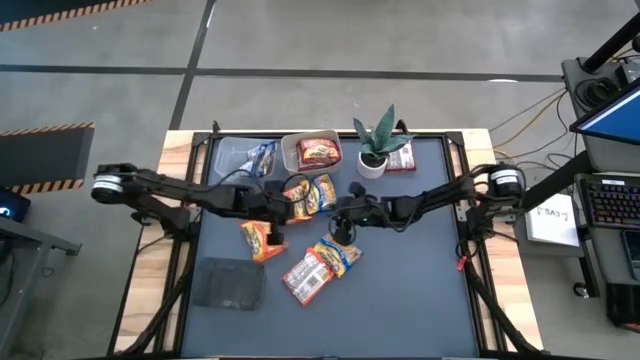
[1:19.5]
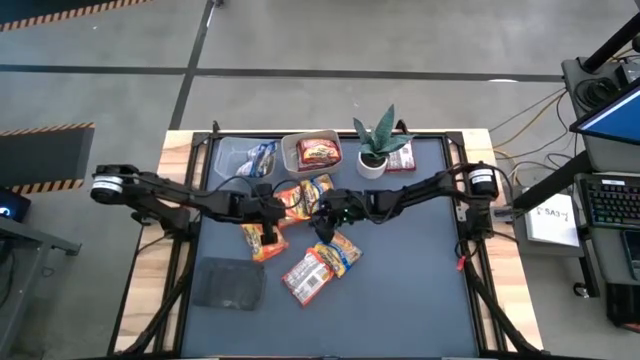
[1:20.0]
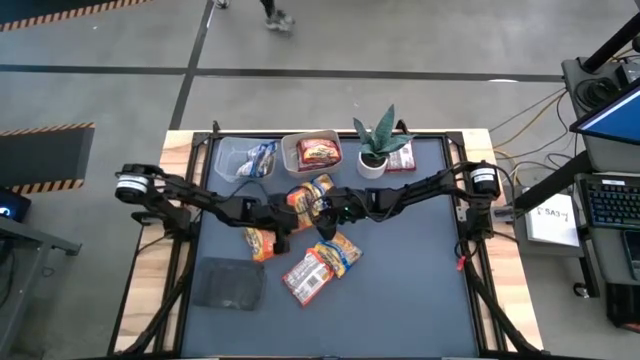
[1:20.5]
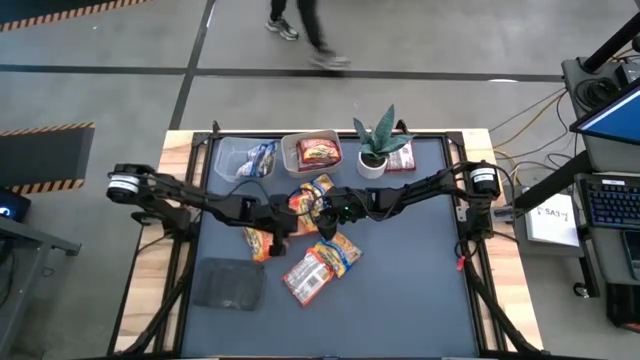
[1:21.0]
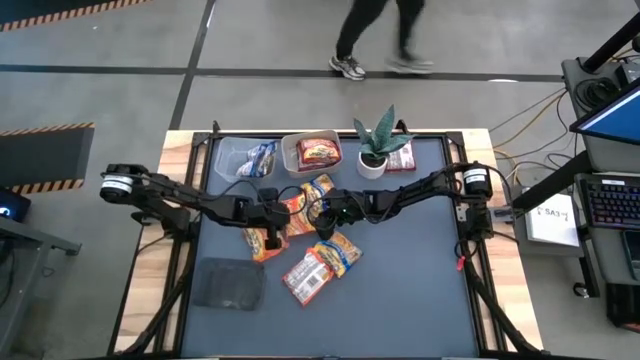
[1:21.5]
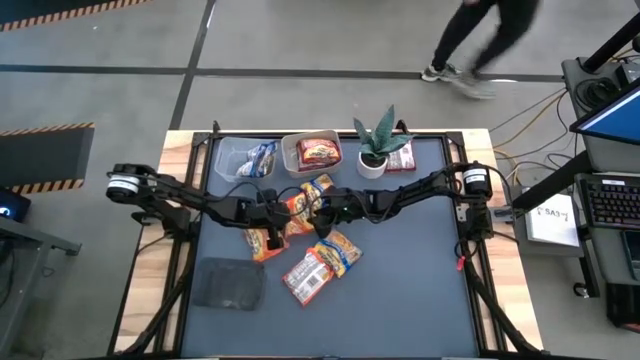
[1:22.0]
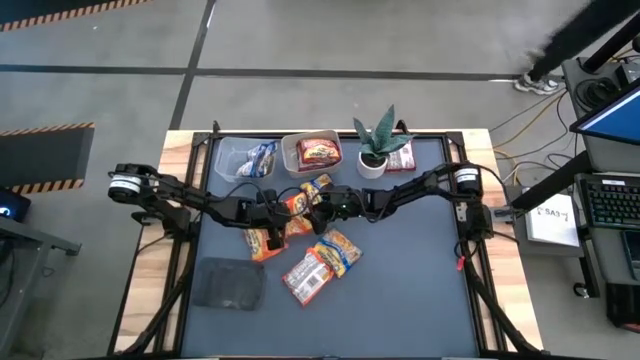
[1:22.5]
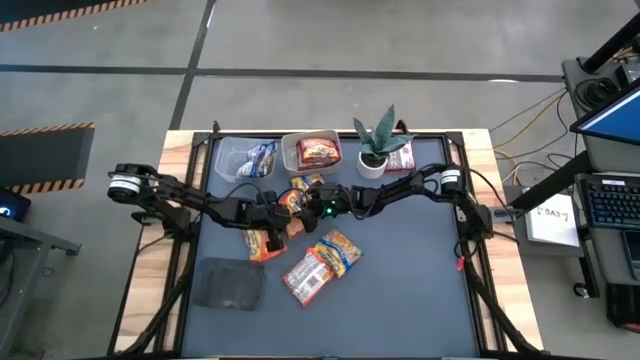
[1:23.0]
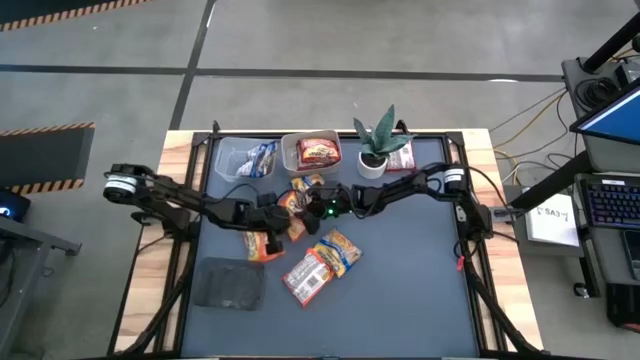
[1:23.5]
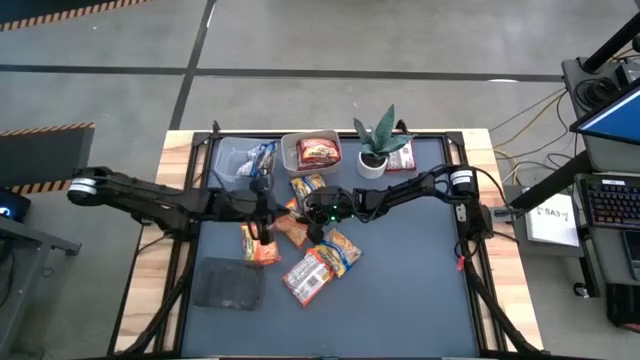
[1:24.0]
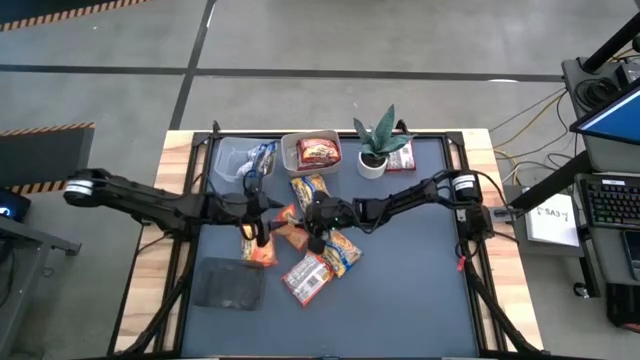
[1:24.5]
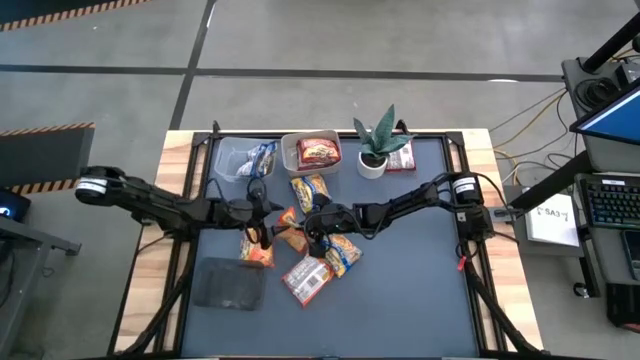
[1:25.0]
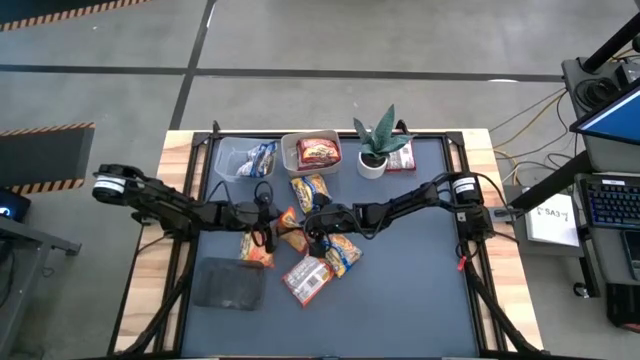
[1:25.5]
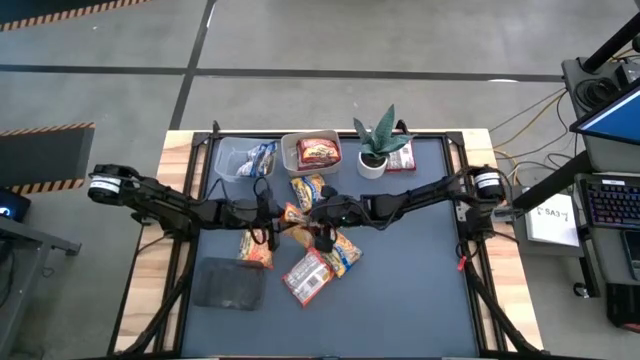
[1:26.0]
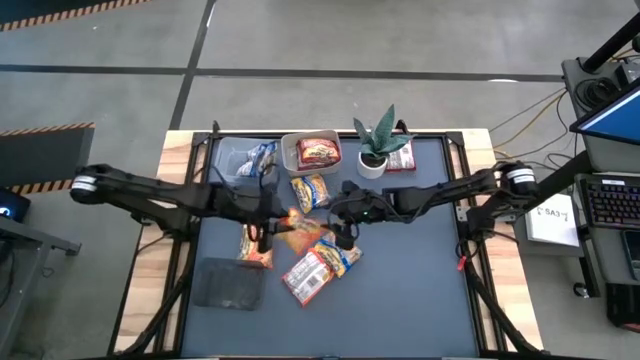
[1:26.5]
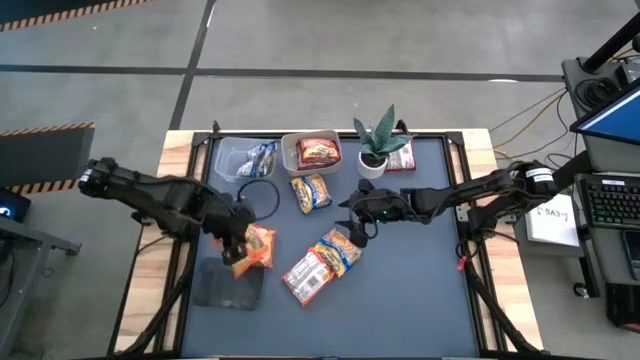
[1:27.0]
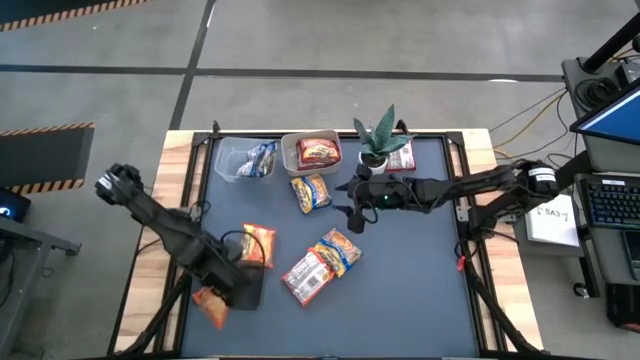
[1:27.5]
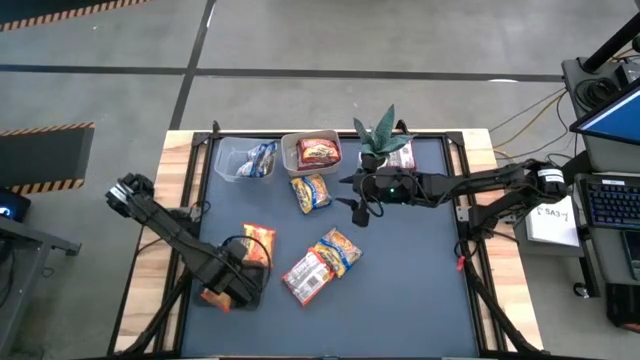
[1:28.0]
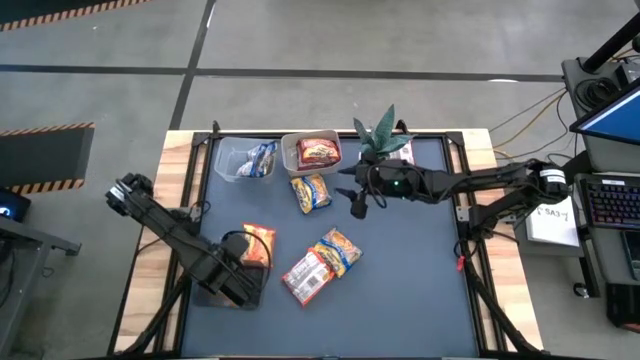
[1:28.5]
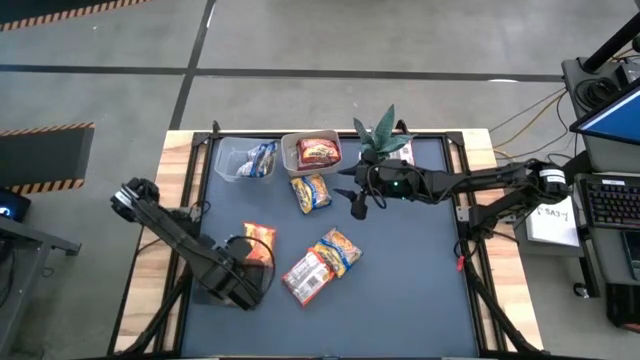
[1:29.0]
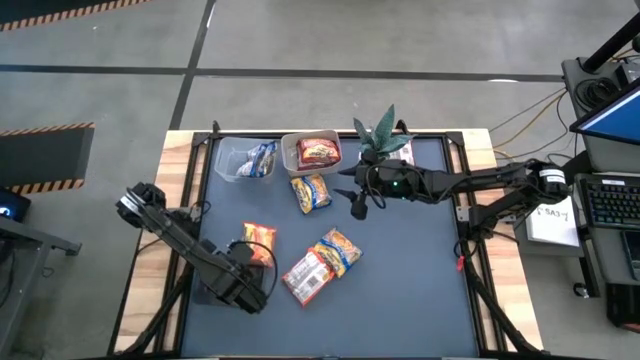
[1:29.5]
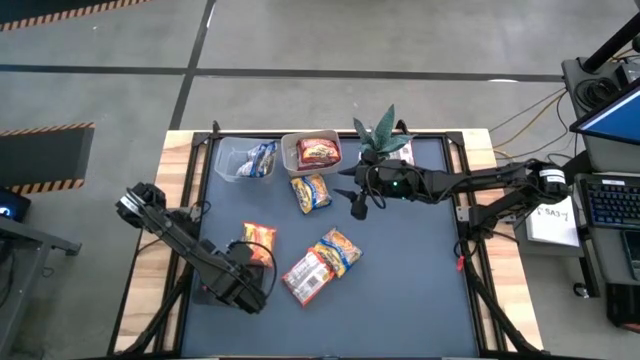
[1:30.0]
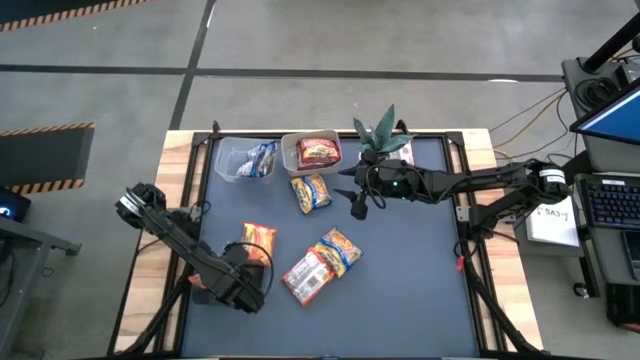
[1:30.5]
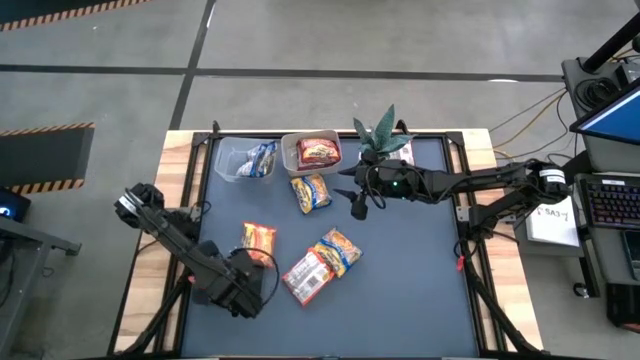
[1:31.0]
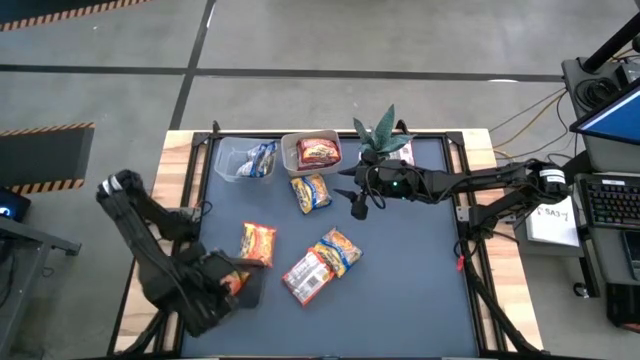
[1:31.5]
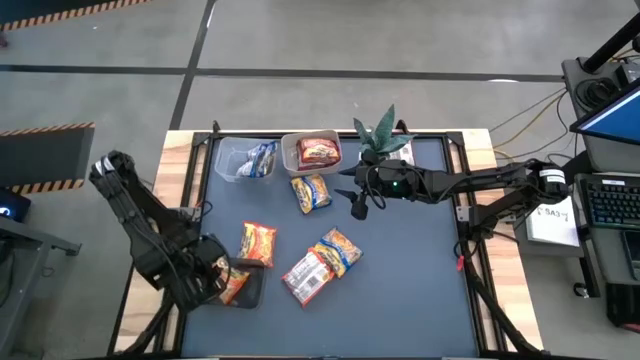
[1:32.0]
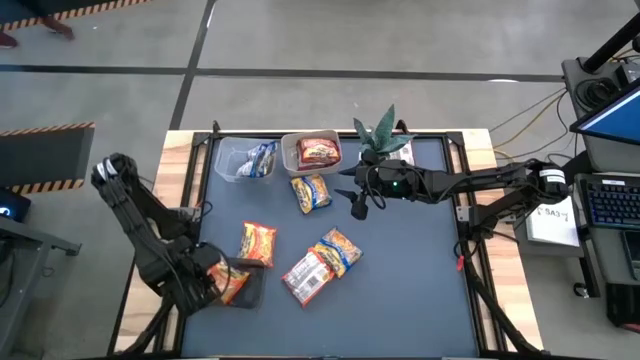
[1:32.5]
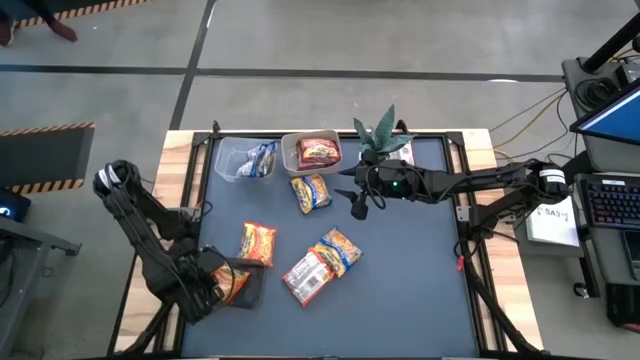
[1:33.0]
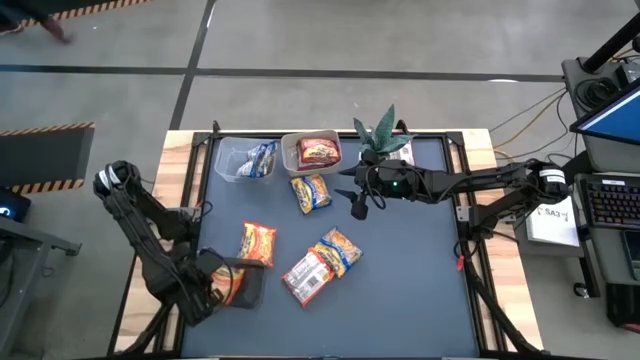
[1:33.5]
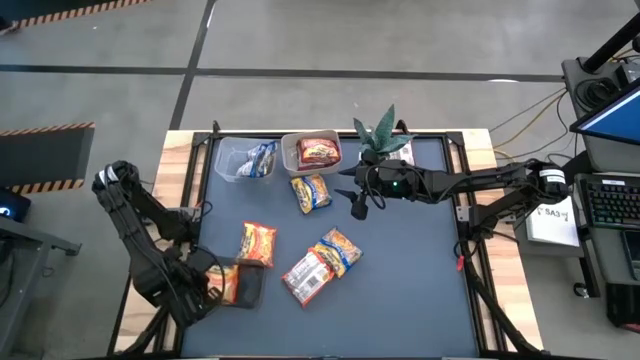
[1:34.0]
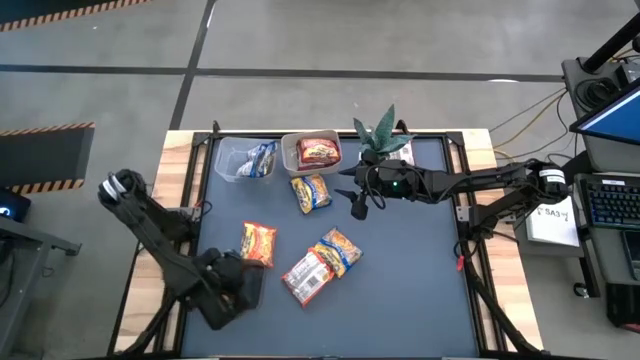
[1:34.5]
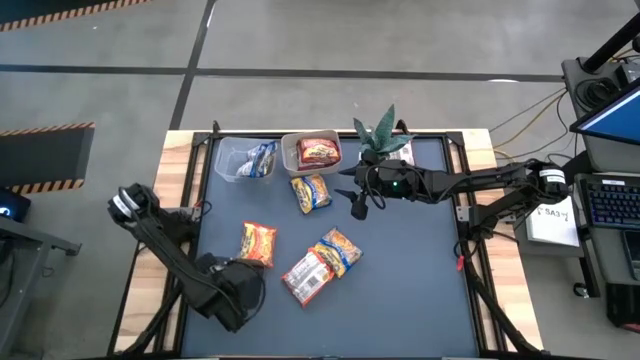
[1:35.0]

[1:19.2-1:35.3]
Task: Sort Maruchan noodles
Put the orange noodle pack into the black bin

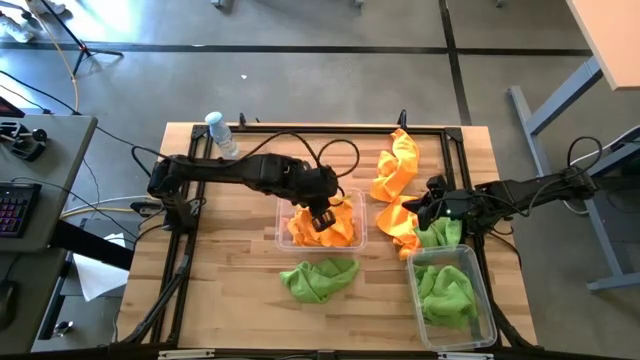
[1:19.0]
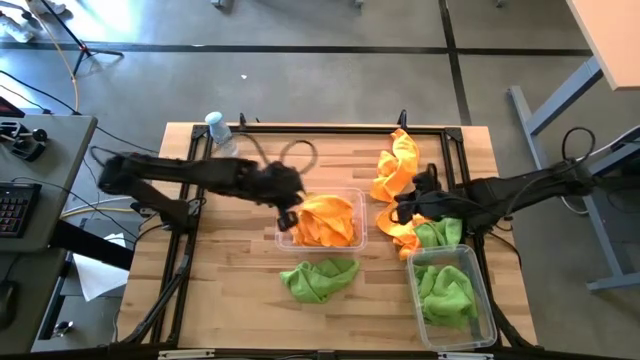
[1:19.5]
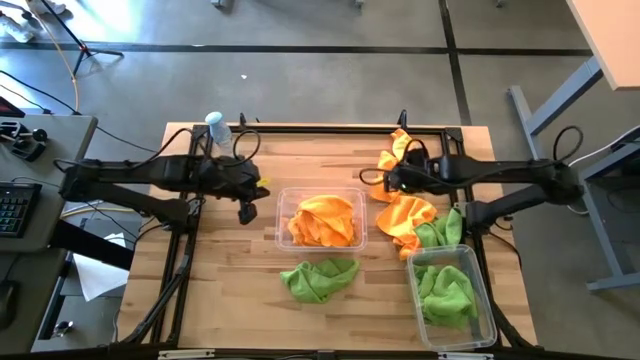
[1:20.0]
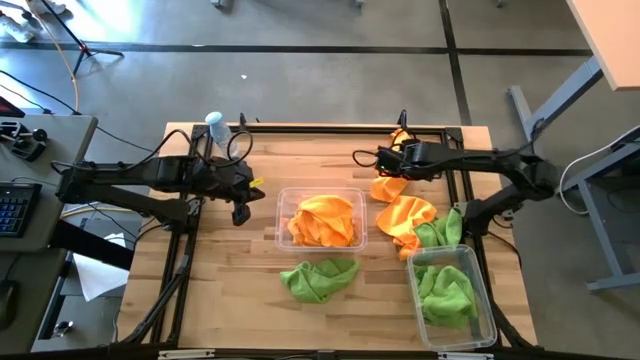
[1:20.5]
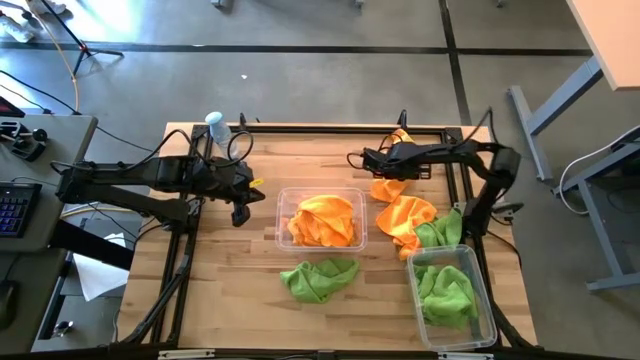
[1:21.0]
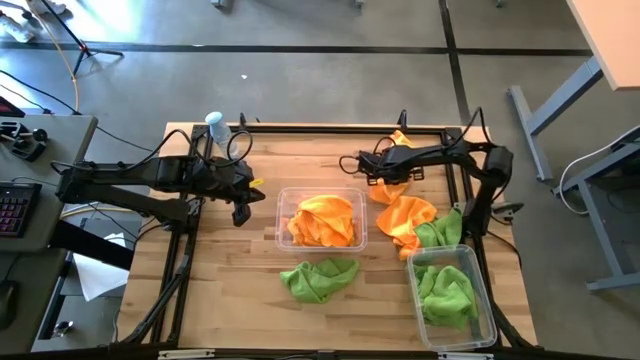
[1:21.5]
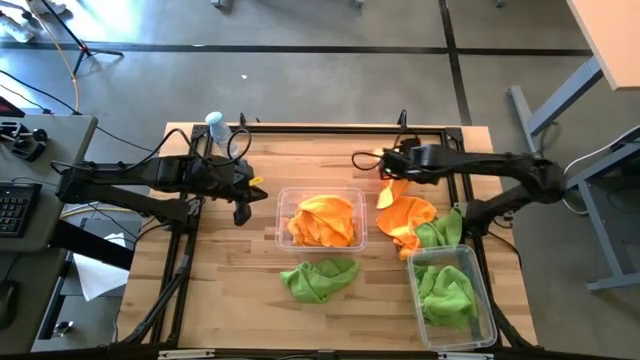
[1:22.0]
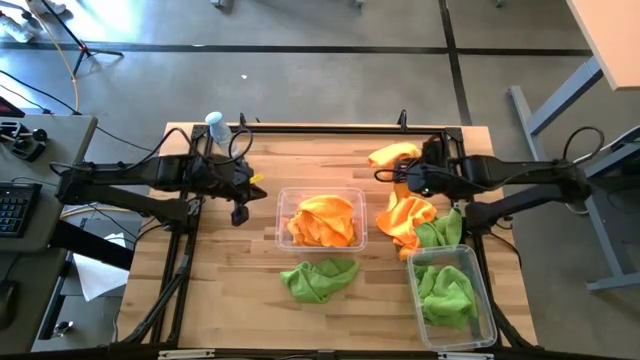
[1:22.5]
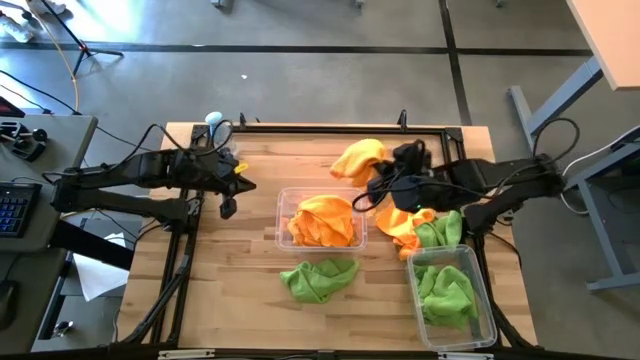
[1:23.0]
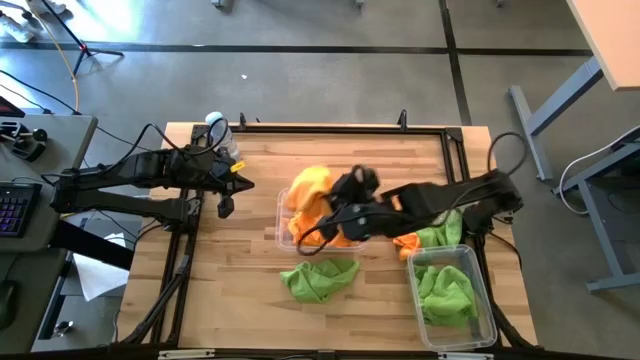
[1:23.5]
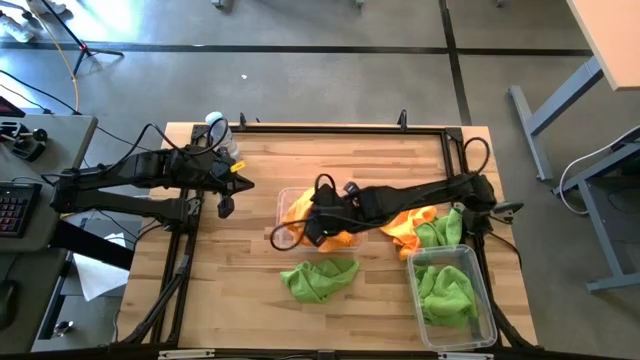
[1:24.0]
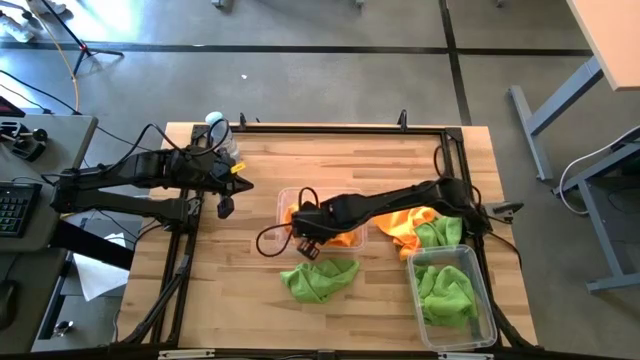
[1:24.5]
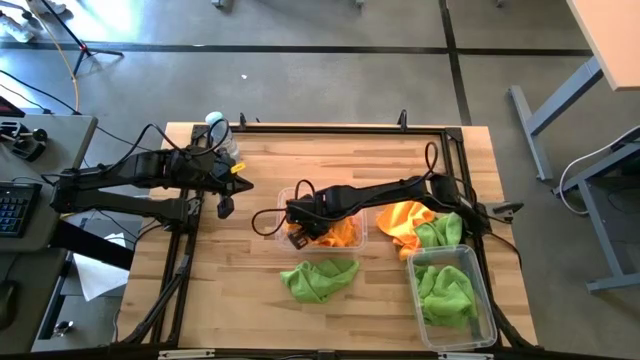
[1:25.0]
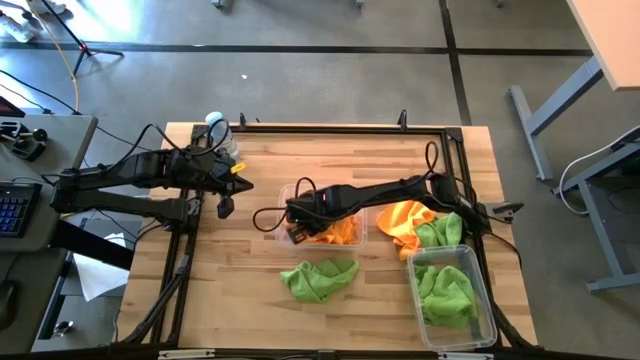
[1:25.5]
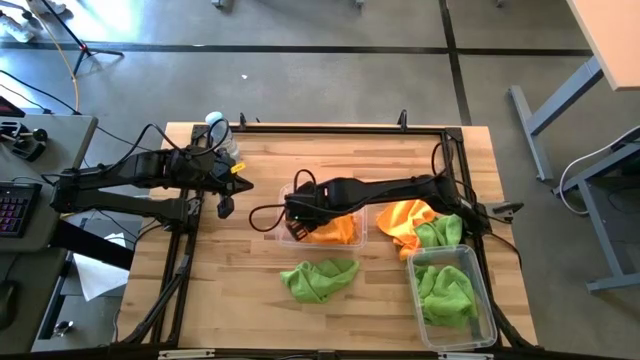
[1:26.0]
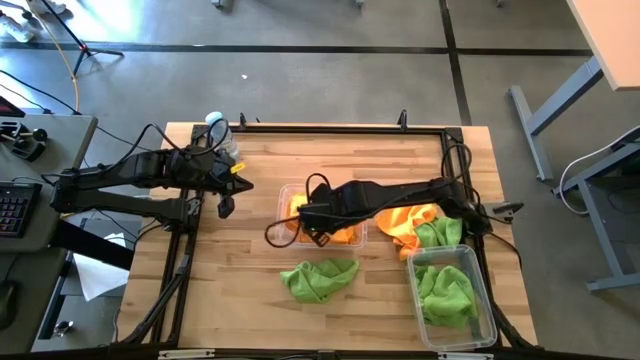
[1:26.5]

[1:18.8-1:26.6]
Task: Sort microfiber towel by color & place in baskets
Put the orange towel into the top transparent bin
